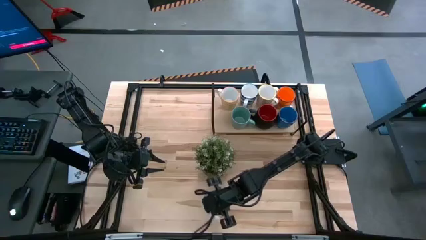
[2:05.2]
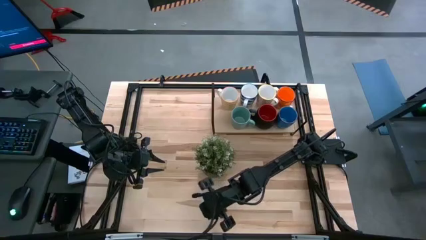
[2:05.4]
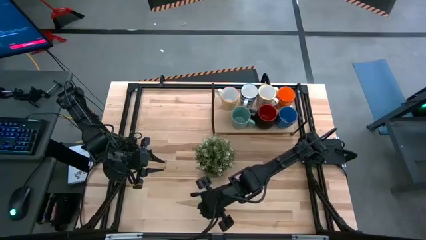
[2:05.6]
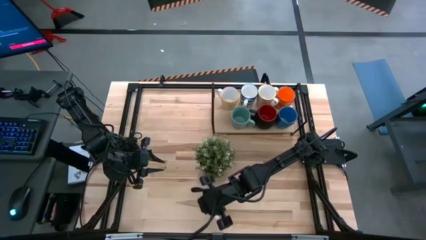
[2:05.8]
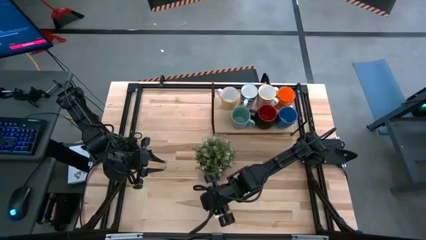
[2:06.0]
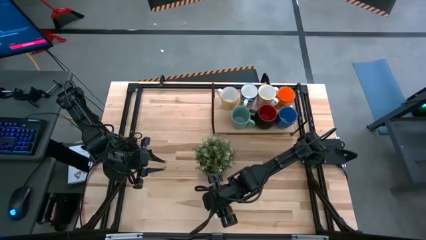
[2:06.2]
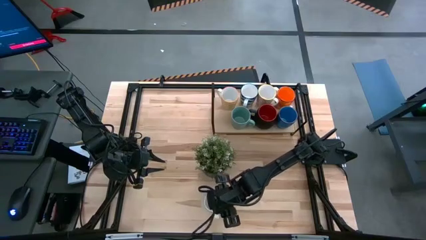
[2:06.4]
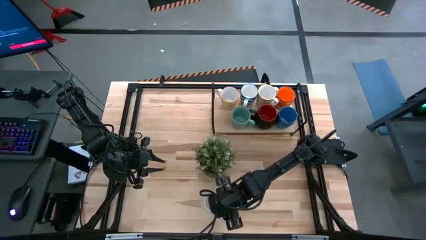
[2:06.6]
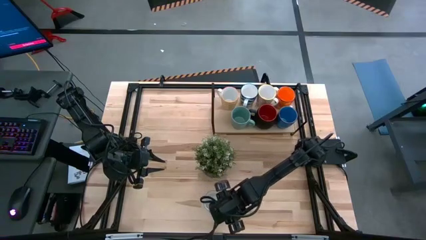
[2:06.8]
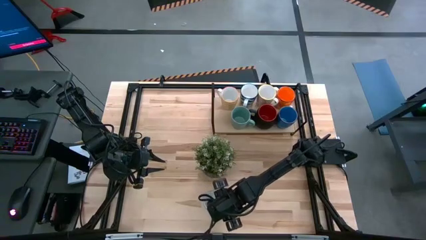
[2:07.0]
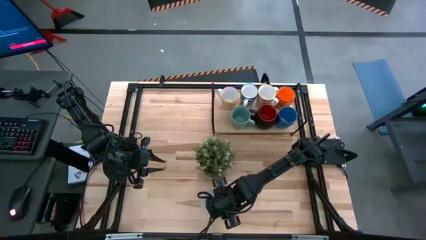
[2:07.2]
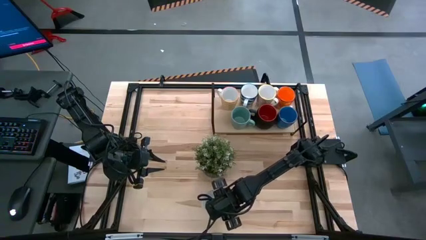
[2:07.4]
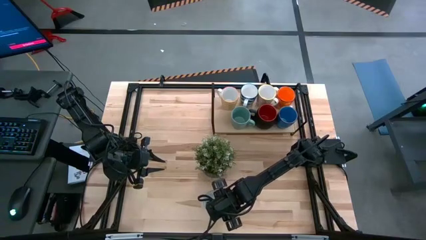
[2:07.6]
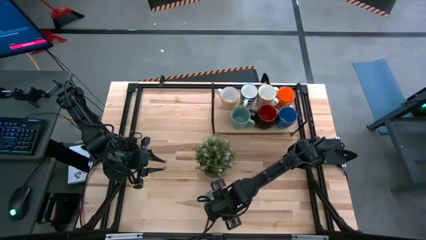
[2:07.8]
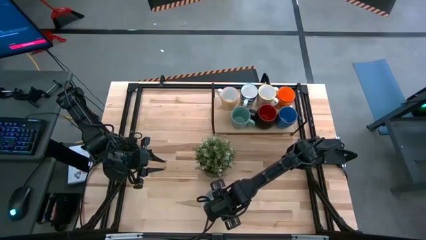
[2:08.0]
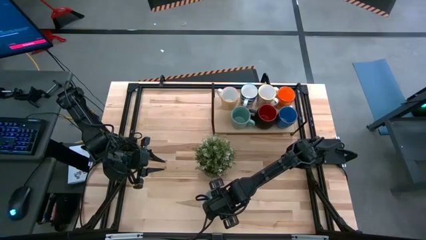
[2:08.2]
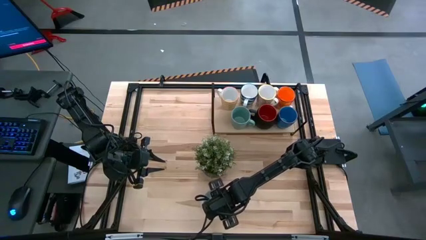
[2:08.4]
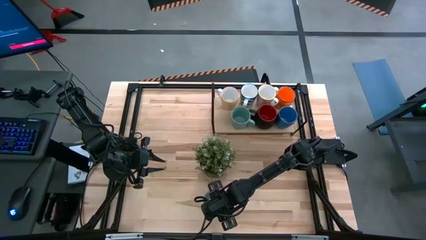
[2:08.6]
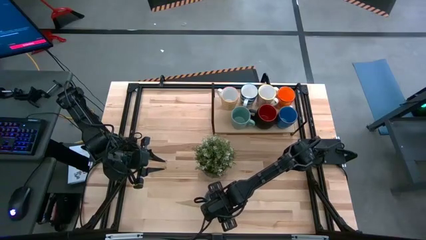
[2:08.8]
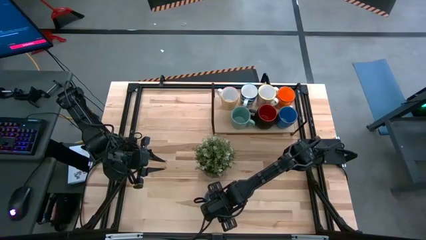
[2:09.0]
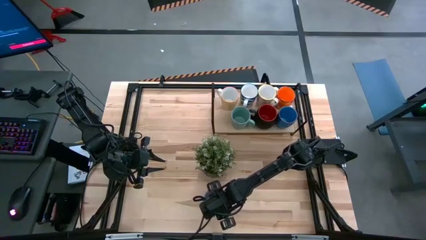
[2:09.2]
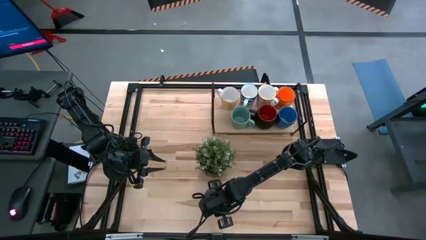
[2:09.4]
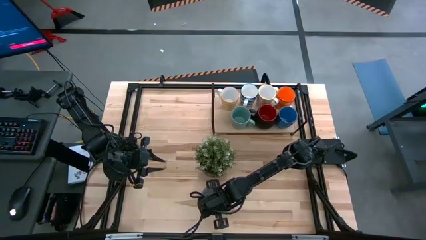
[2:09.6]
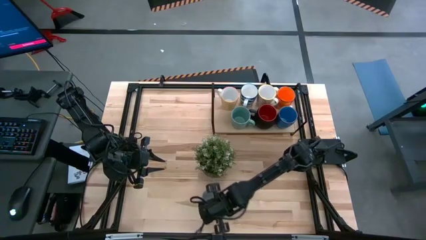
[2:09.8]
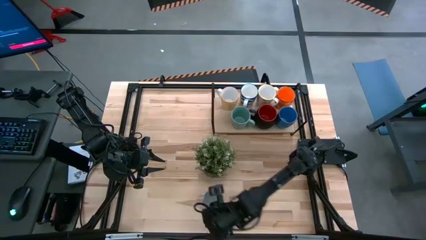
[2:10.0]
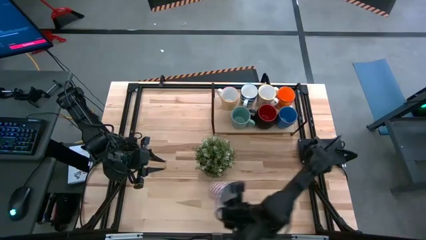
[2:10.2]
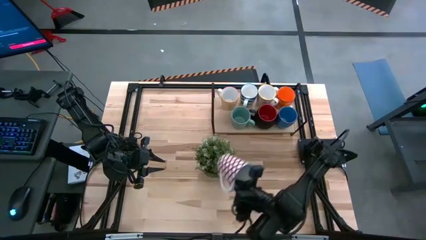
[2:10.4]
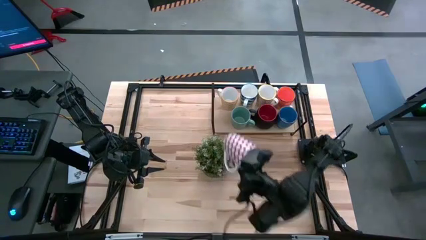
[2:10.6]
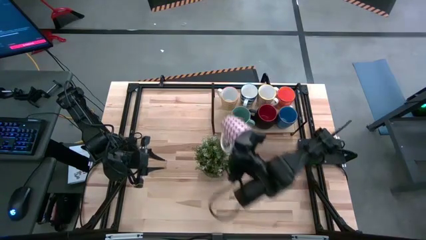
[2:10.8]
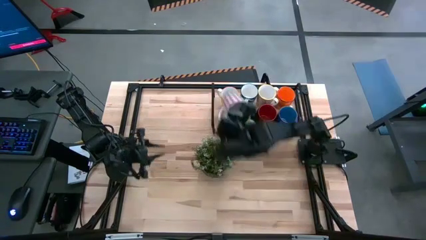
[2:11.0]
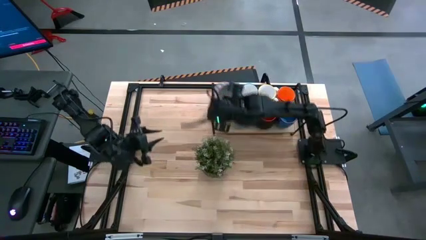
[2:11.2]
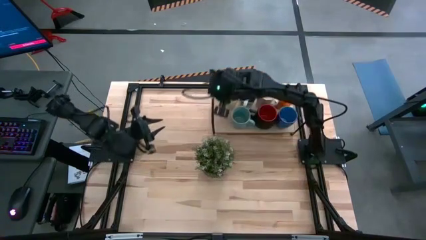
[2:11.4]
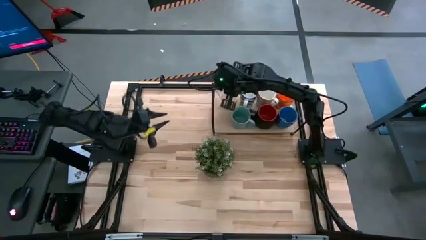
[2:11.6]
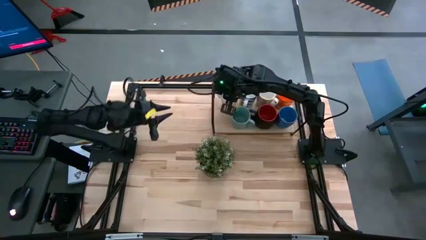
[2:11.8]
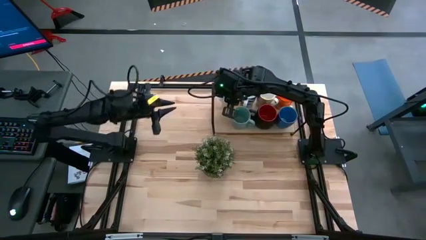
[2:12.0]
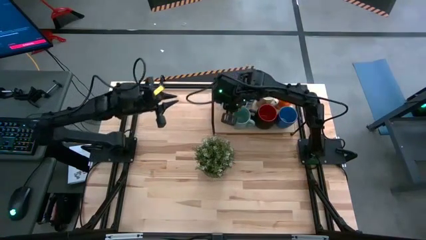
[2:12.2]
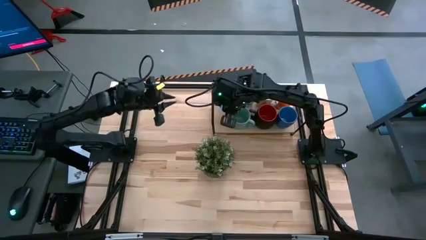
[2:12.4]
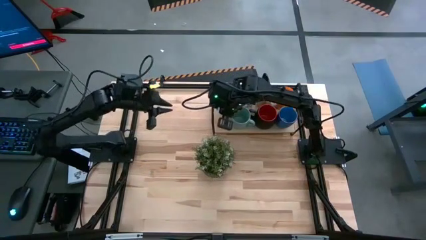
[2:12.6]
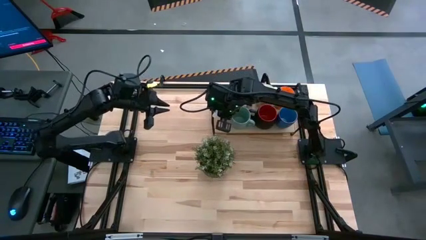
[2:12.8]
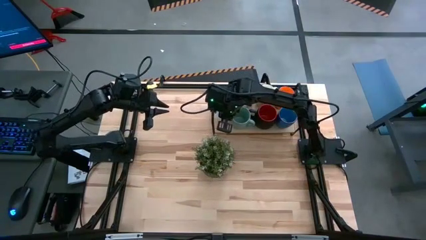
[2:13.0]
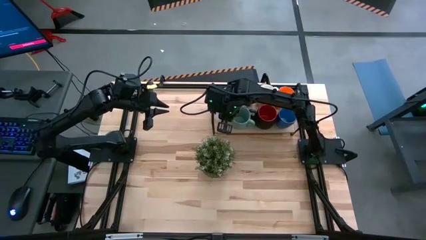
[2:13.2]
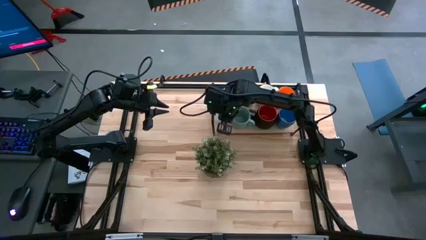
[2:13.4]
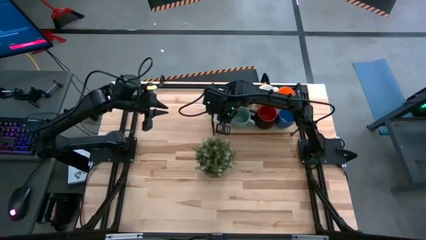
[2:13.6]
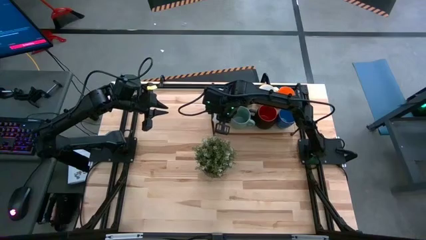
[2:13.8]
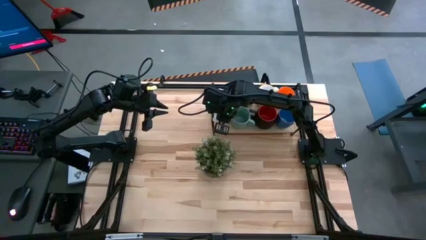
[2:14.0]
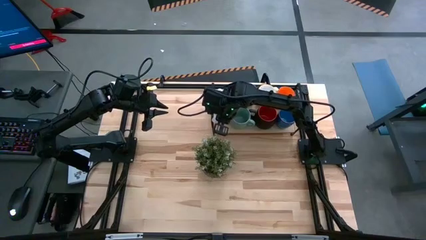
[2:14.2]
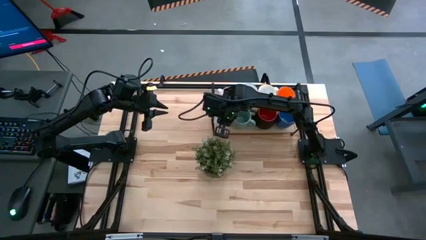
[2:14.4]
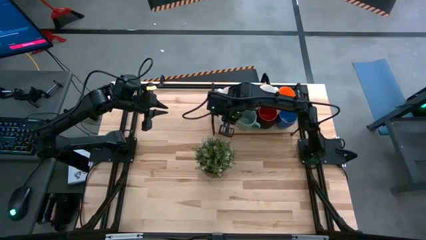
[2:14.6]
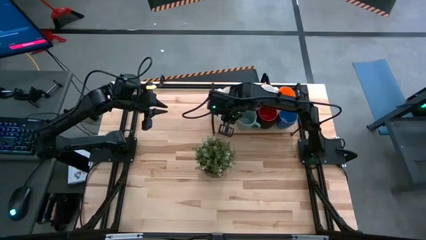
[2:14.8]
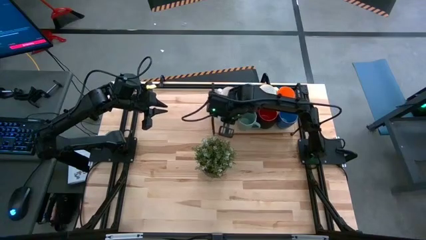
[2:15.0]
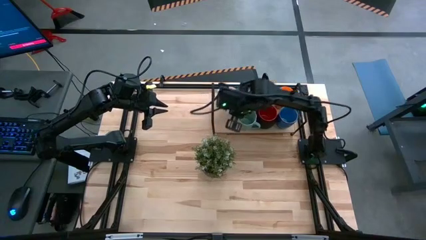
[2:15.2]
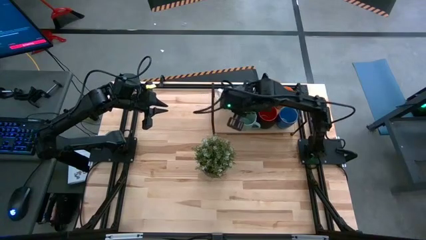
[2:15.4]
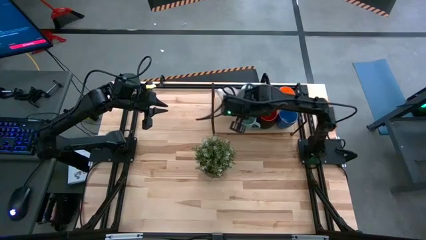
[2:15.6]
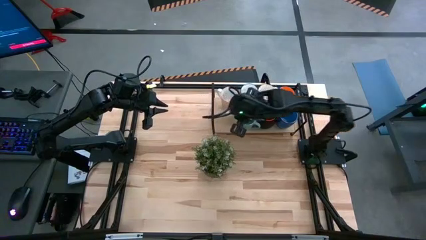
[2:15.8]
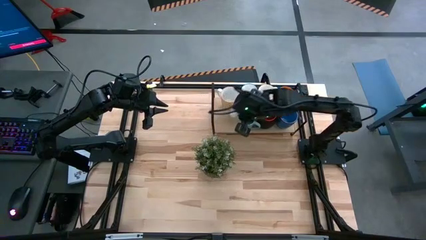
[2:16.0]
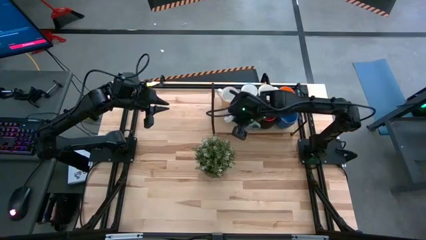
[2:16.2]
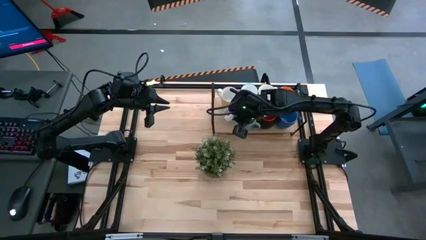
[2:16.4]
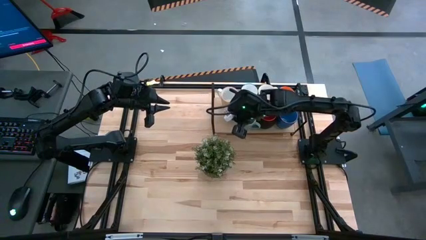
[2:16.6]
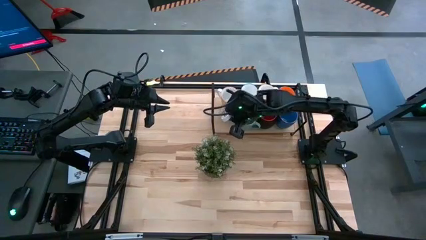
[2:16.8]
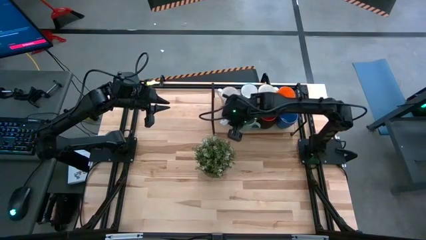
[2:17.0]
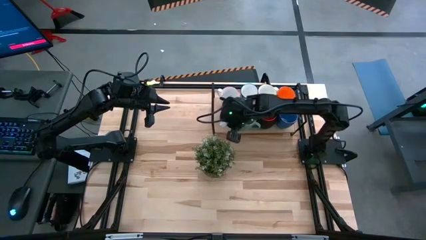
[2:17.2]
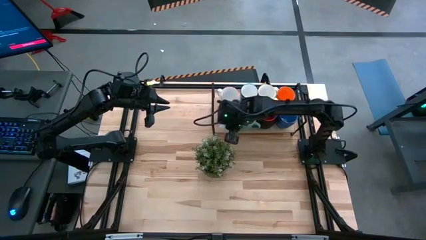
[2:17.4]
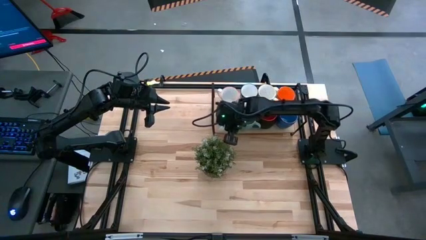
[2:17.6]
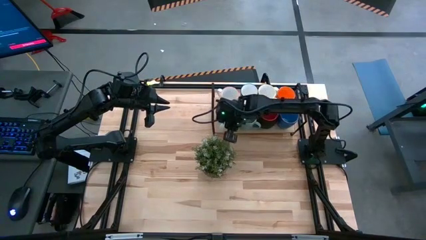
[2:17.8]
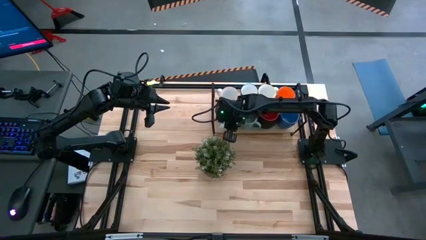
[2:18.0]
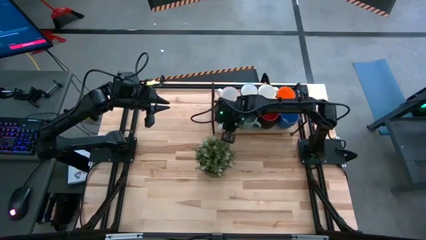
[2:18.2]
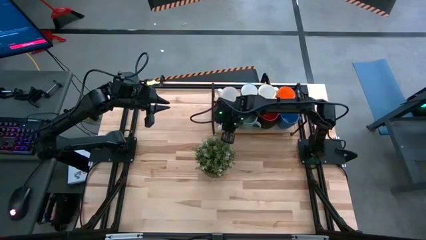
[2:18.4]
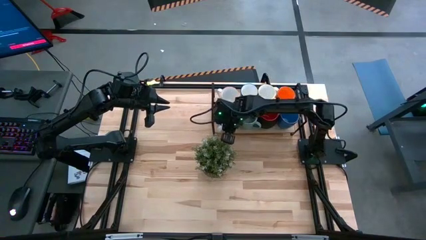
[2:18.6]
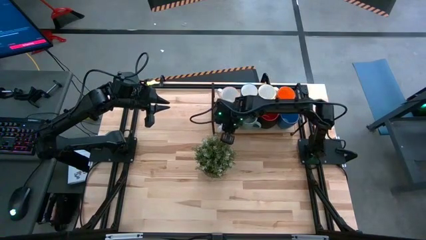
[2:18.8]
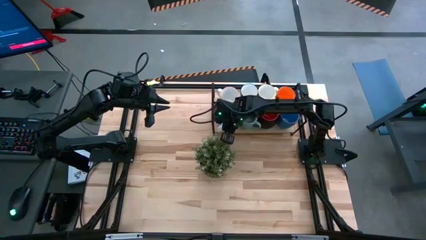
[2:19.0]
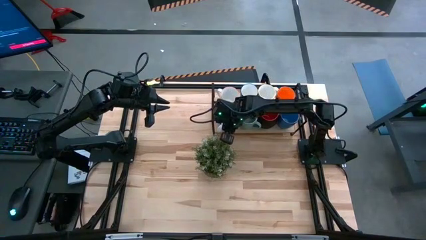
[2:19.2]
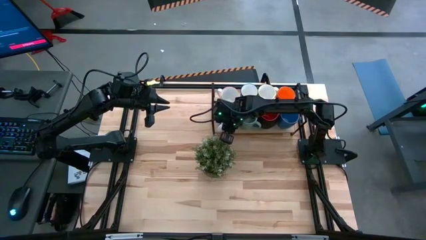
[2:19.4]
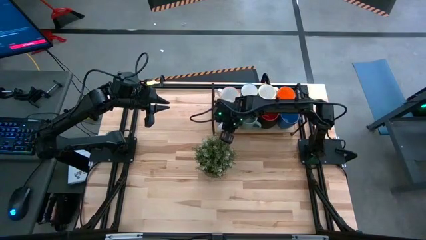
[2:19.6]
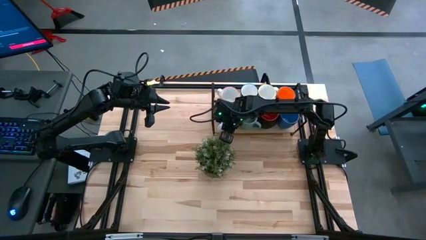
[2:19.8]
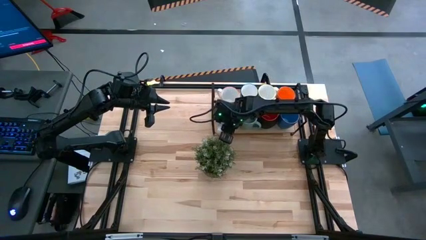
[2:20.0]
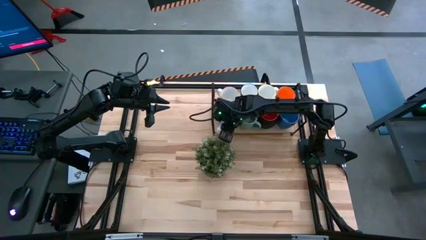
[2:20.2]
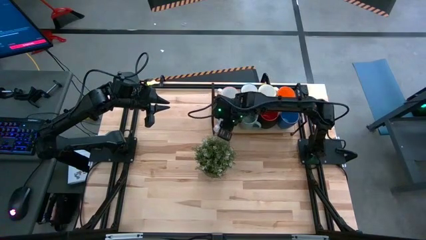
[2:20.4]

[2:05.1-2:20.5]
Task: Place coffee mugs
Put the red patterned mug on the shelf
